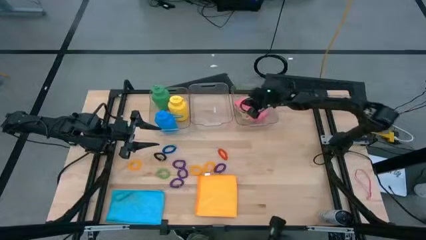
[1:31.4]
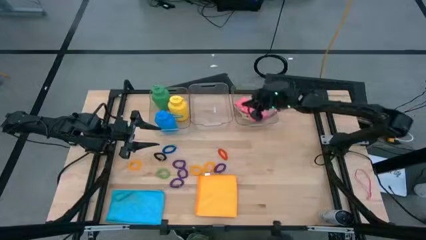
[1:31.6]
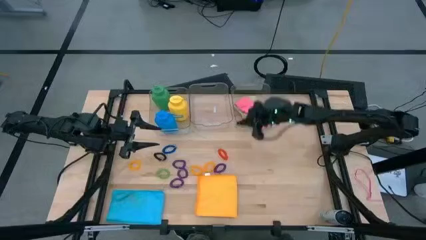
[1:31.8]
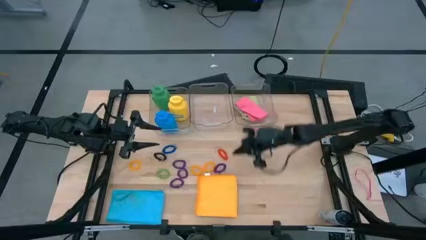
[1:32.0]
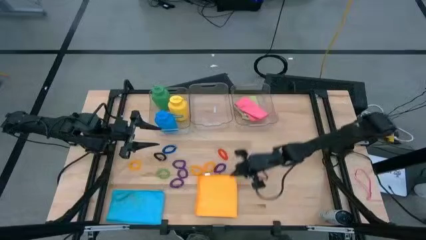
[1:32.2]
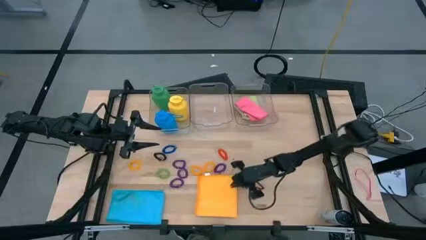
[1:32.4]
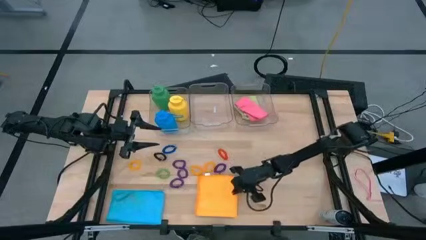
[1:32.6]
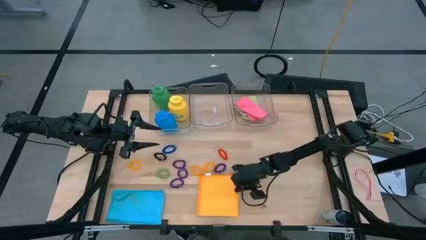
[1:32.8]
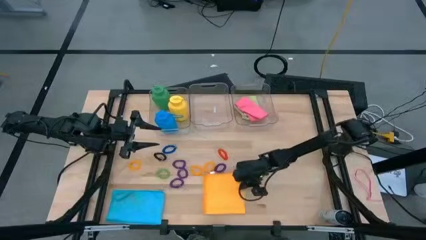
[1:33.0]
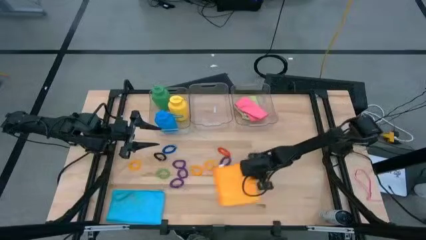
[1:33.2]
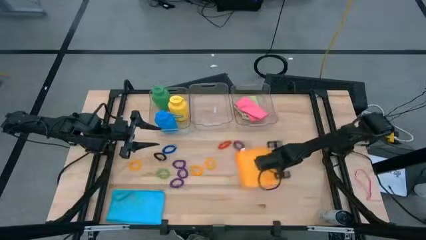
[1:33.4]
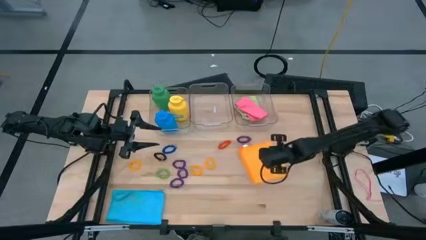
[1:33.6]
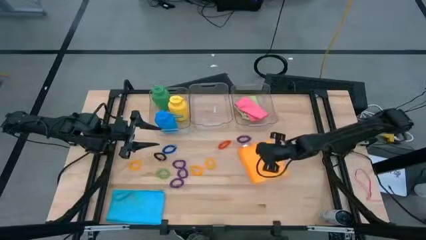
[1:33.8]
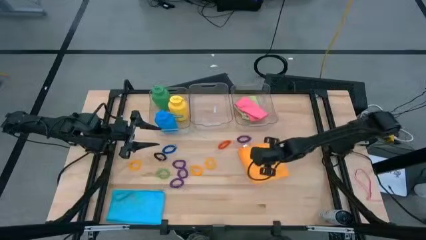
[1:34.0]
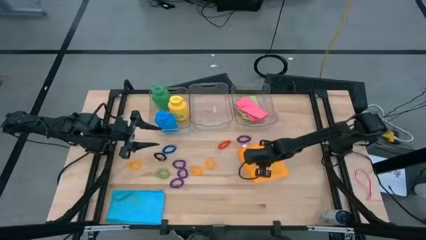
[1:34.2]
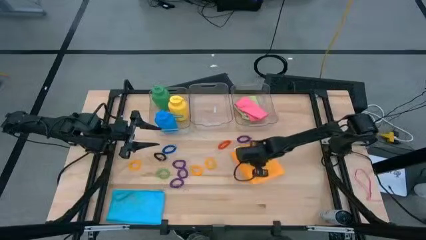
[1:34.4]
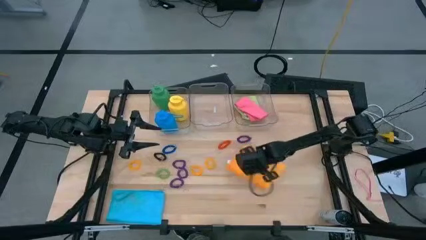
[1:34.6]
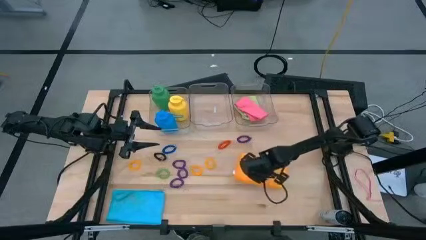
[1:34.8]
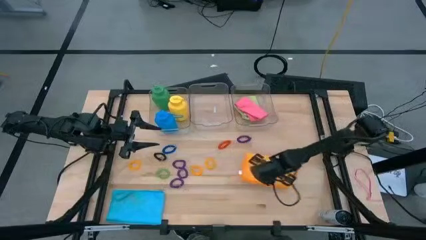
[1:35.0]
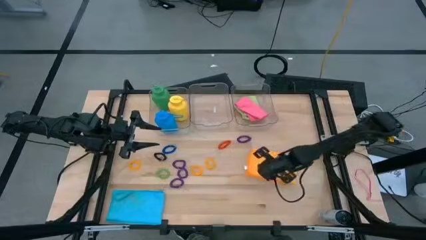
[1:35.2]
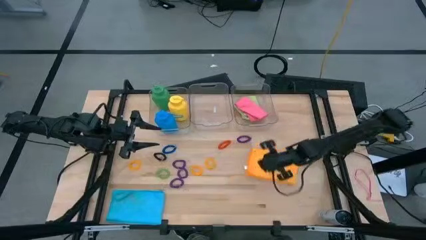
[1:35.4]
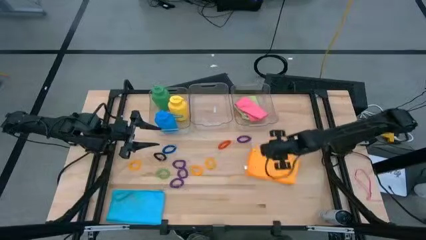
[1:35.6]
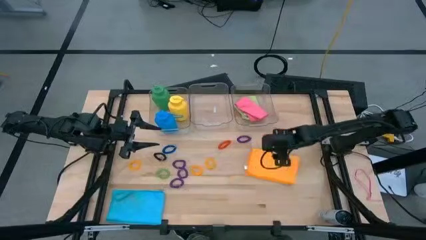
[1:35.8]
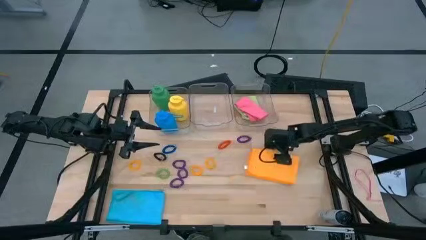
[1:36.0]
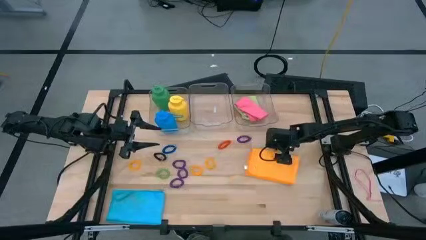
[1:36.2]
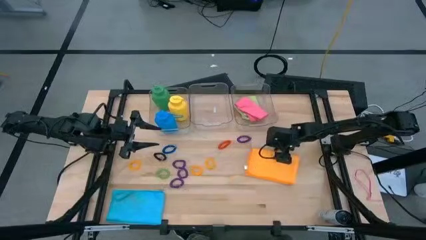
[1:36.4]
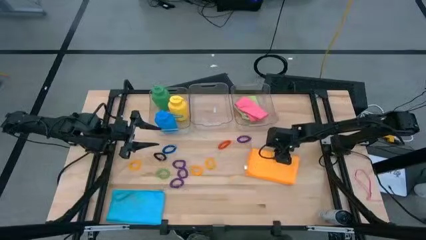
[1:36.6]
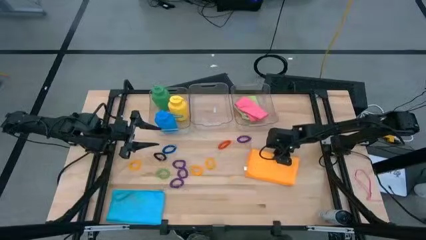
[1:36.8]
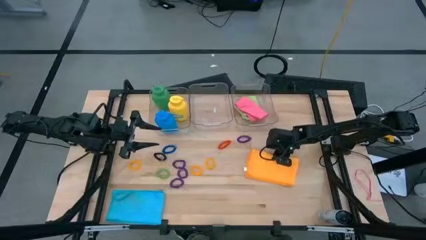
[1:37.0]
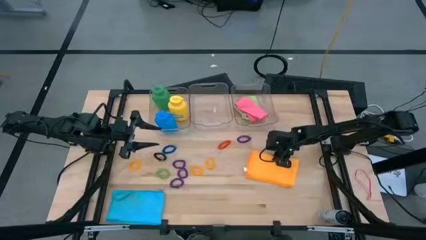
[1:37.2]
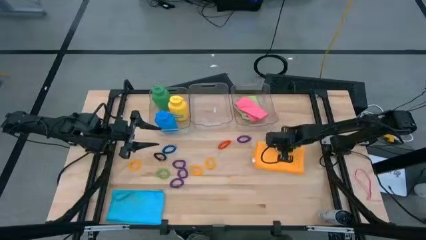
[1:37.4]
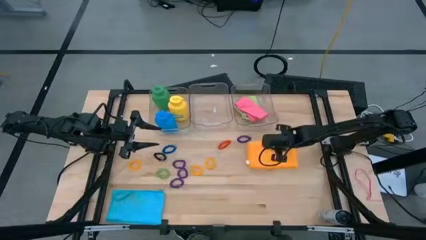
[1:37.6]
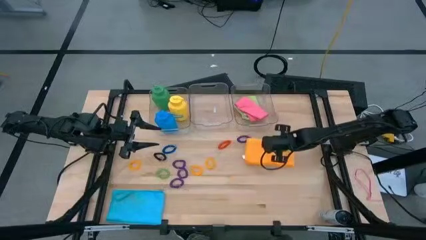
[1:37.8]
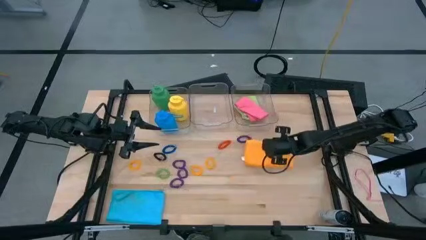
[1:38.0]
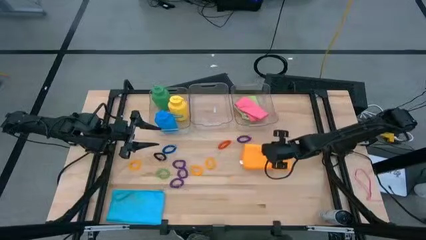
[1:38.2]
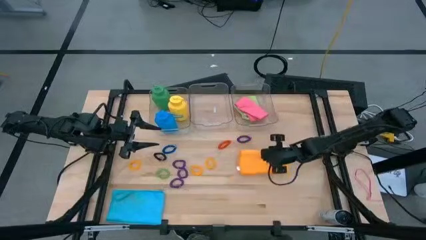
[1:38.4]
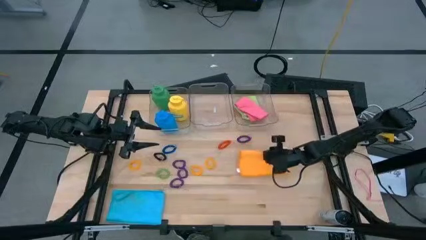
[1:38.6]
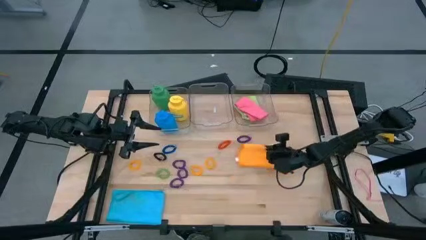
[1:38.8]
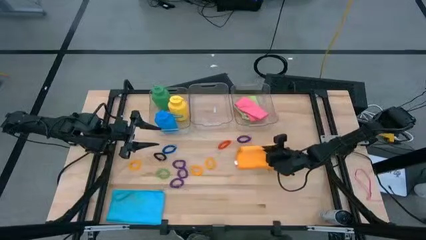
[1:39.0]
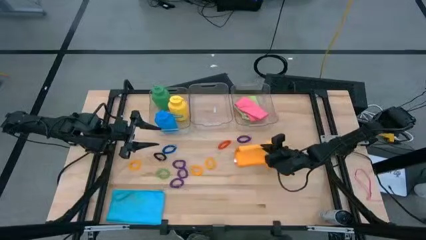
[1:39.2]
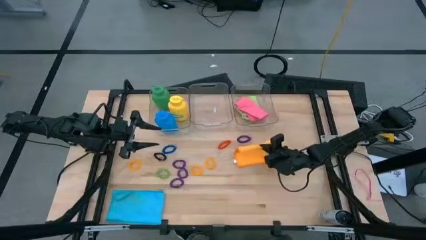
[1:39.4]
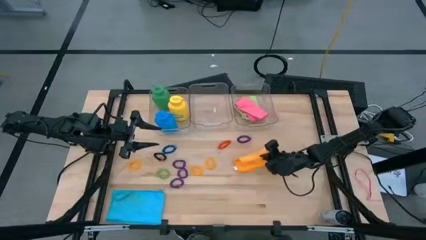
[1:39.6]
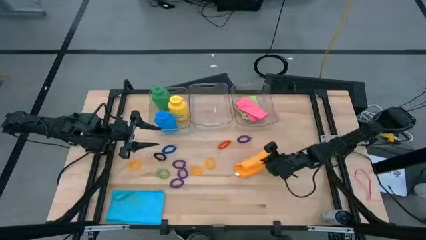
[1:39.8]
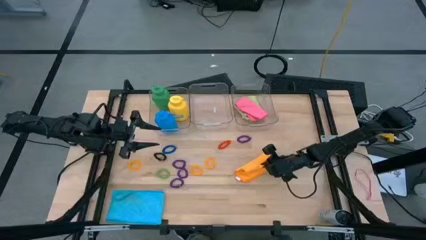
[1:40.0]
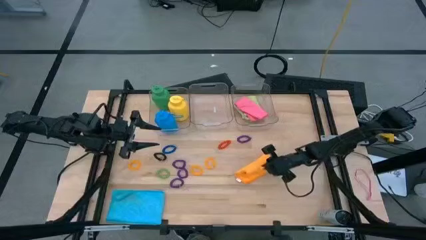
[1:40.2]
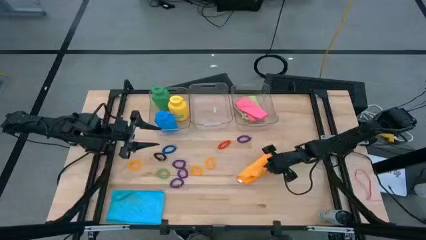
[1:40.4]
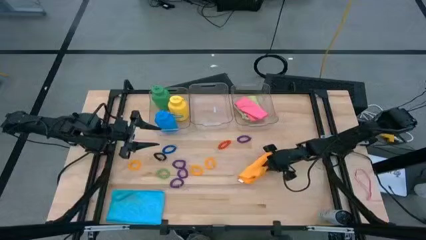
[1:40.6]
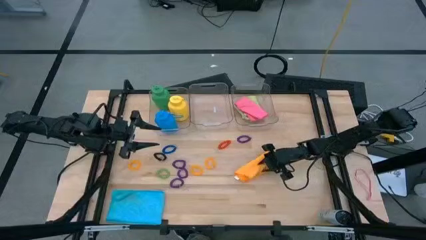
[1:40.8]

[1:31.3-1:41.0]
Task: Pick & Place Sports Items
Fold the yellow cloth

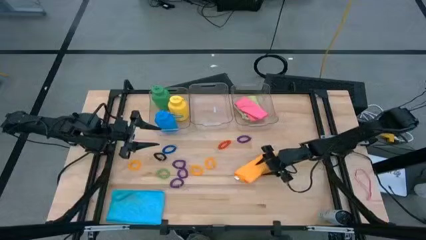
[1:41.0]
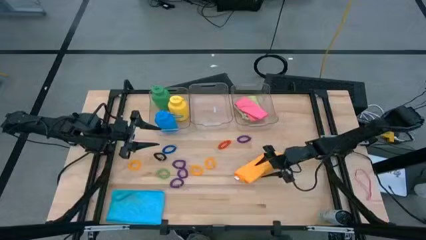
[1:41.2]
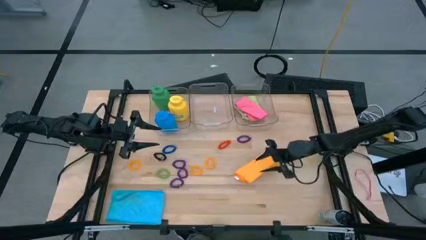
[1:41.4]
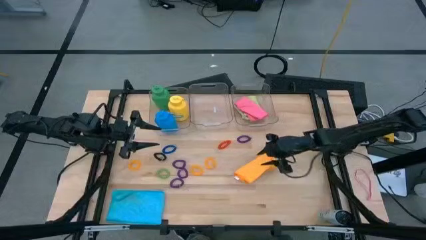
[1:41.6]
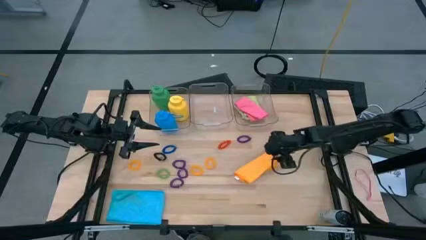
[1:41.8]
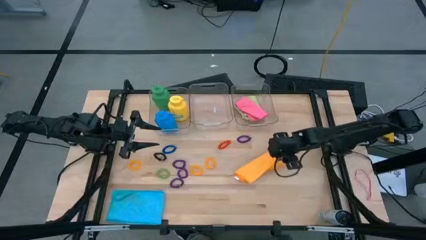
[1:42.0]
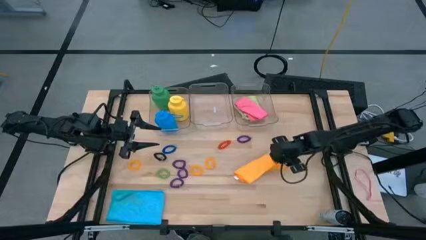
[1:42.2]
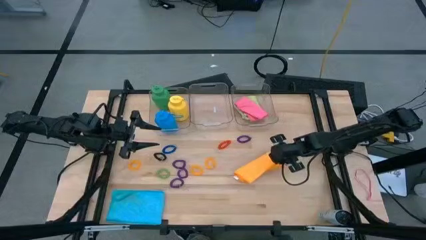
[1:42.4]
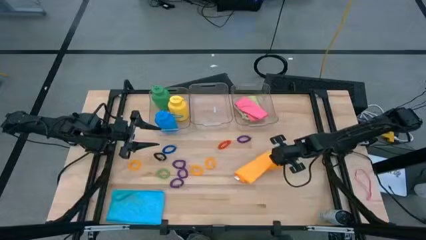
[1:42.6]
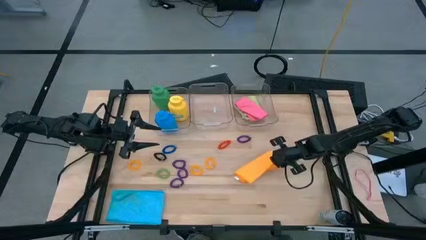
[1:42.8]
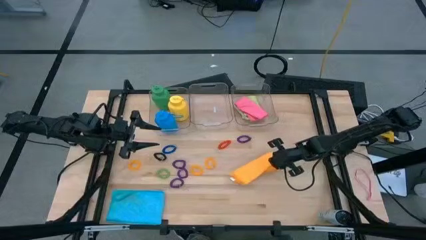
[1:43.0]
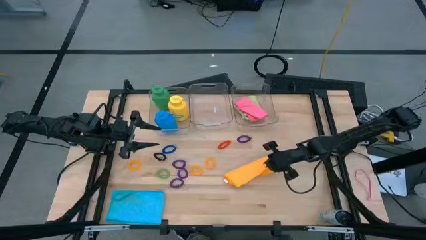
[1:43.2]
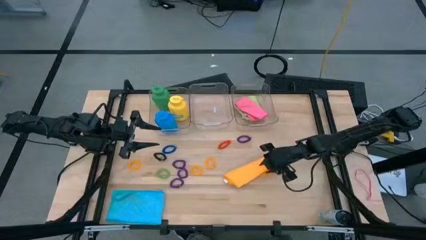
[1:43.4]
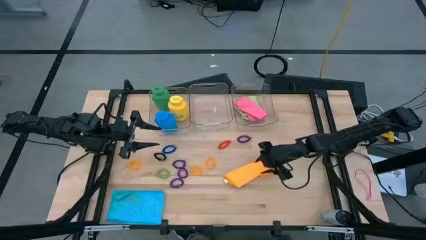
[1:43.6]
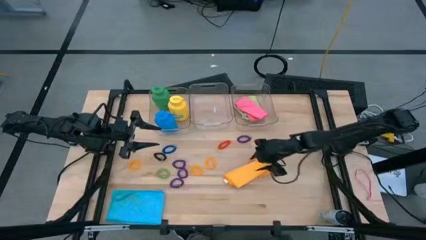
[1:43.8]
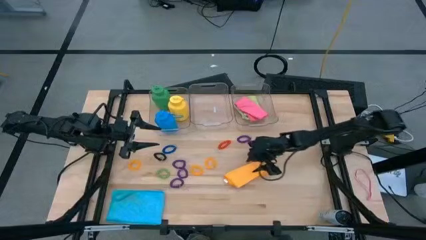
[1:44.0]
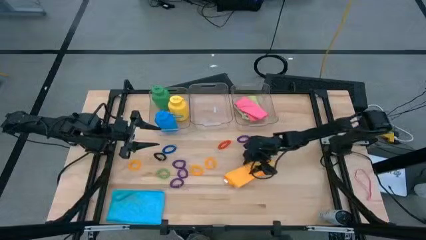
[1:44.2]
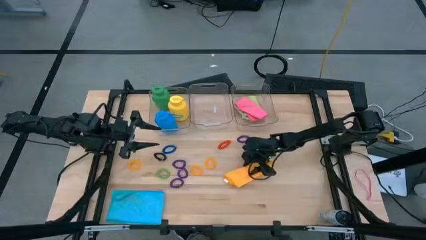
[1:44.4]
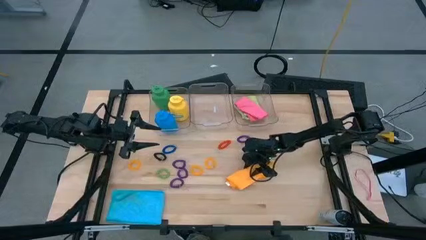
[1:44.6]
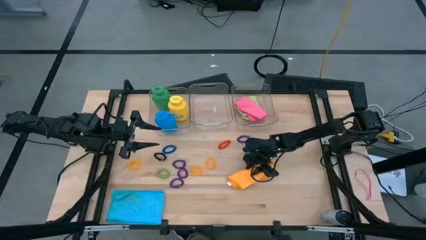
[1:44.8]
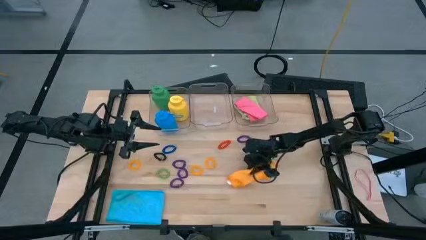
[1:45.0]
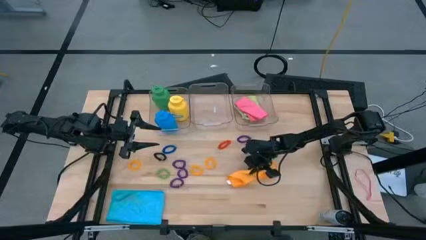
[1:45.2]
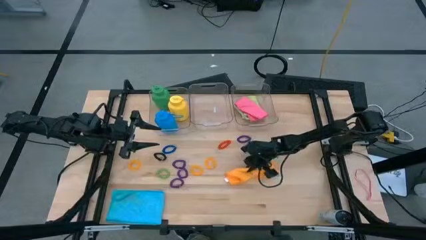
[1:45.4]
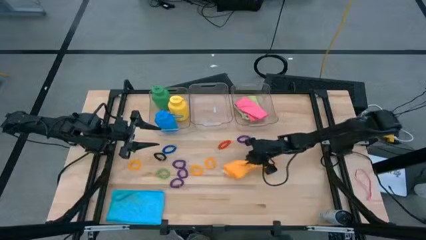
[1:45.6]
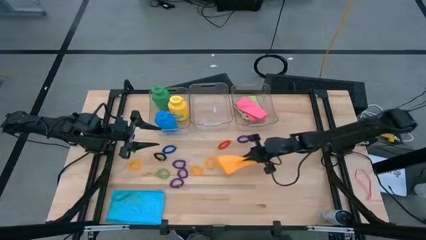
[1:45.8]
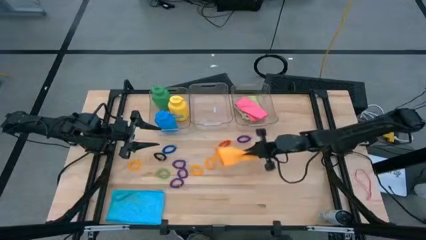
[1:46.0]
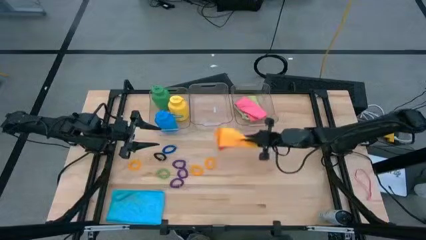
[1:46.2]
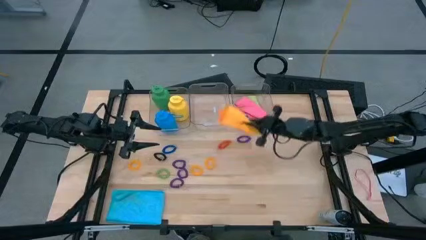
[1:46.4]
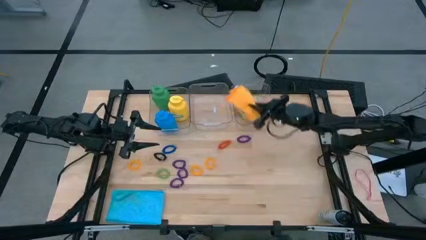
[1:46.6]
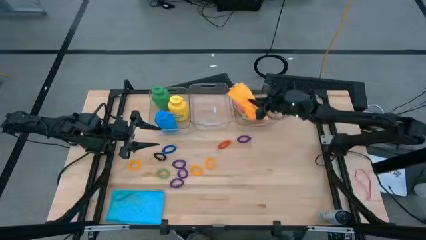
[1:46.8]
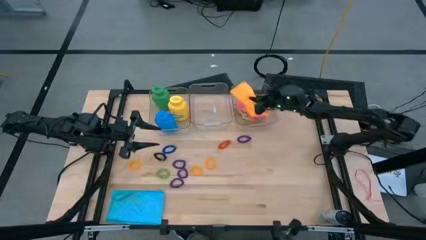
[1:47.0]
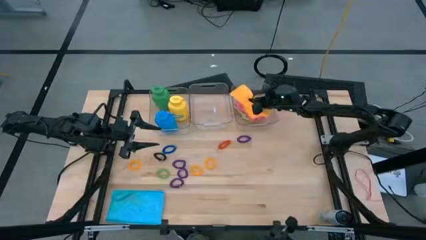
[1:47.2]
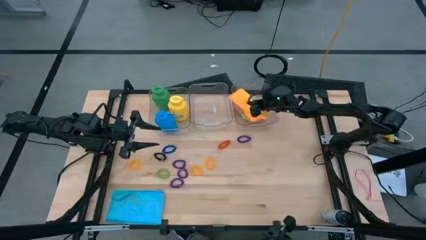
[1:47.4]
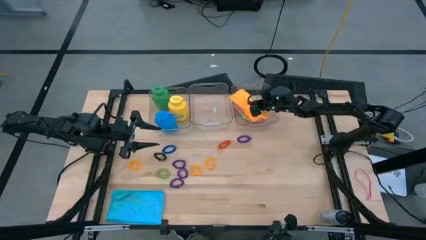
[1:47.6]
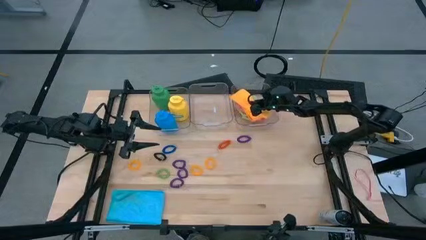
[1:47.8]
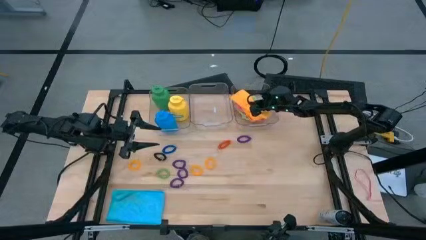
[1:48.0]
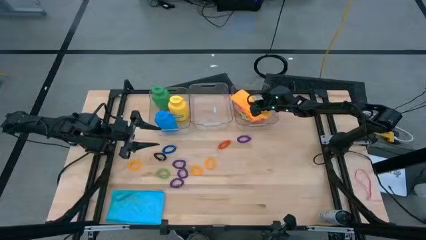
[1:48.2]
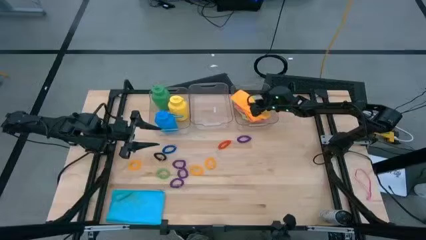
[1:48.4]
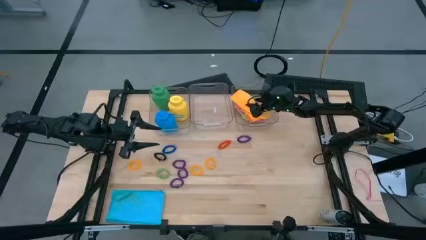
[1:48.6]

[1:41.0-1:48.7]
Put the yellow cloth into the right transparent bin
